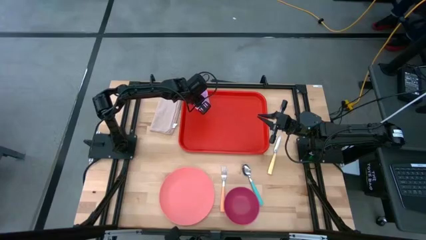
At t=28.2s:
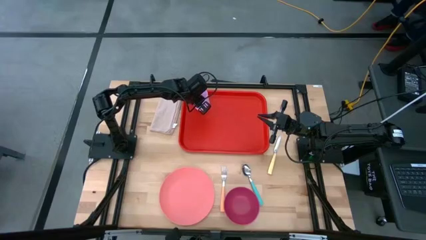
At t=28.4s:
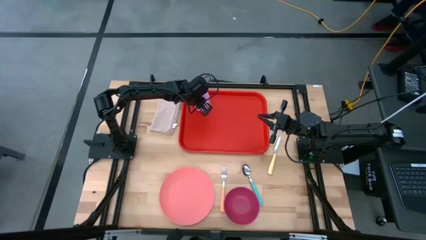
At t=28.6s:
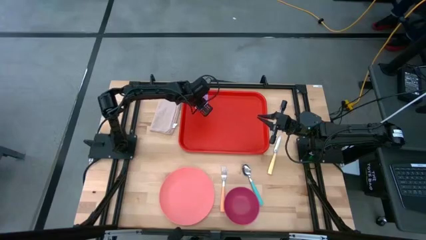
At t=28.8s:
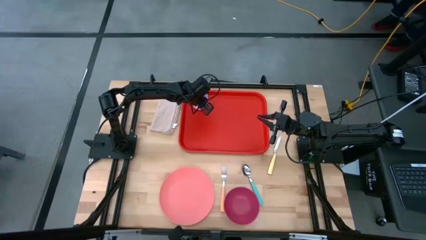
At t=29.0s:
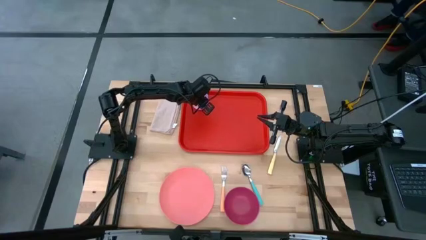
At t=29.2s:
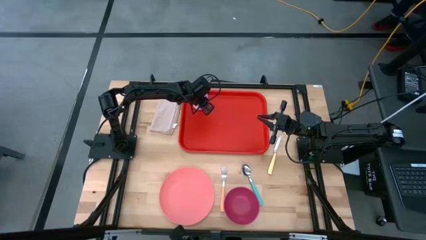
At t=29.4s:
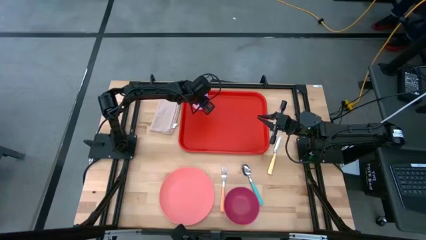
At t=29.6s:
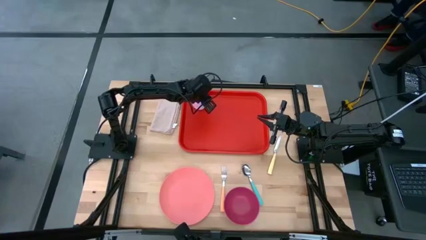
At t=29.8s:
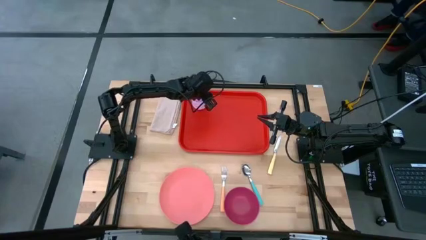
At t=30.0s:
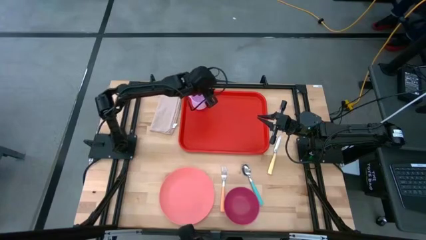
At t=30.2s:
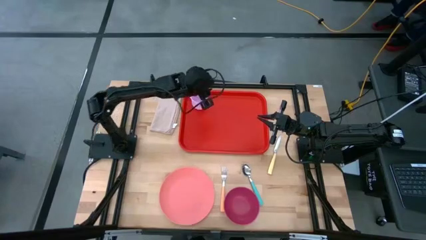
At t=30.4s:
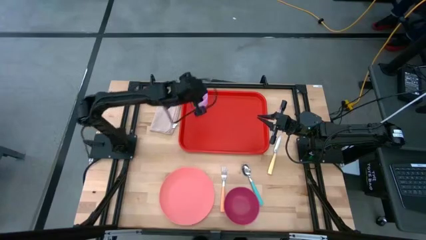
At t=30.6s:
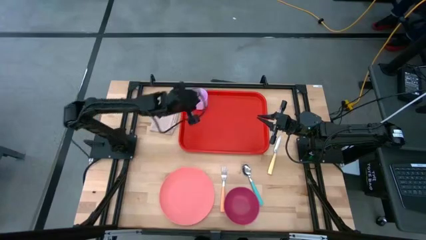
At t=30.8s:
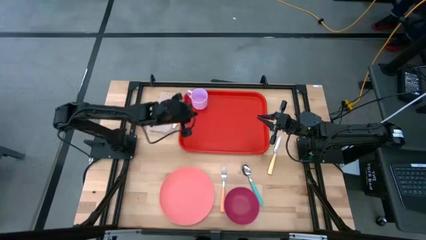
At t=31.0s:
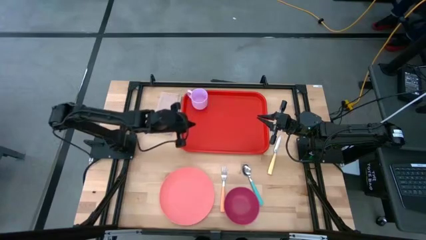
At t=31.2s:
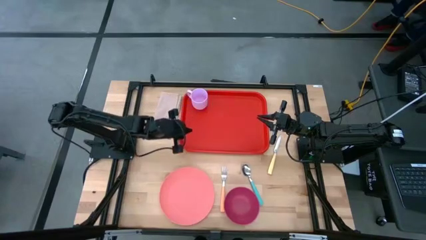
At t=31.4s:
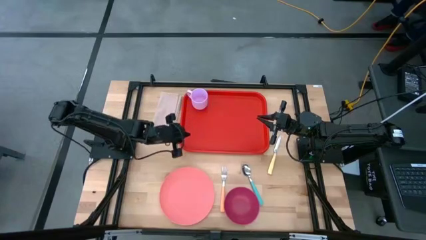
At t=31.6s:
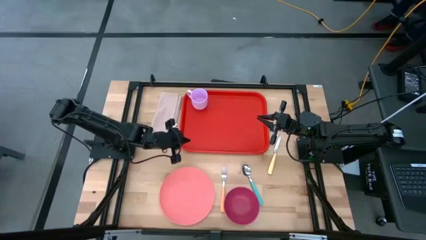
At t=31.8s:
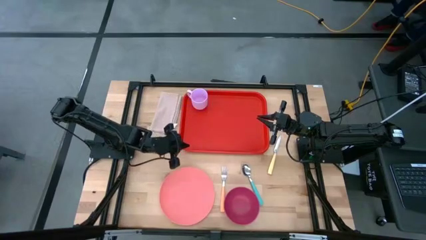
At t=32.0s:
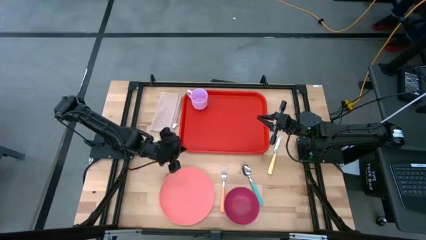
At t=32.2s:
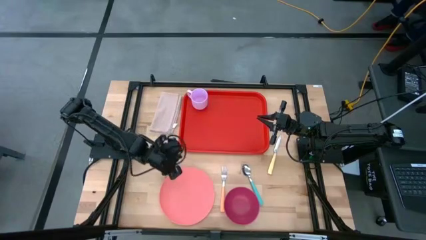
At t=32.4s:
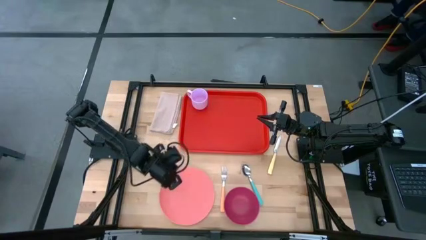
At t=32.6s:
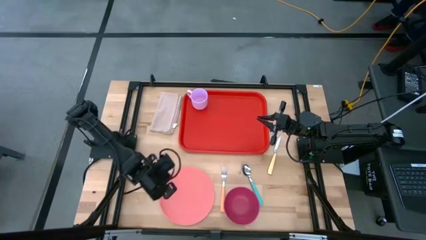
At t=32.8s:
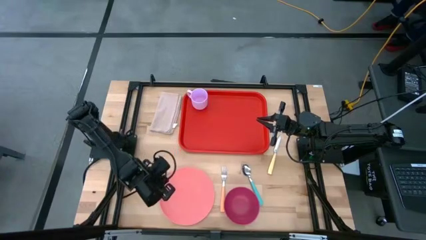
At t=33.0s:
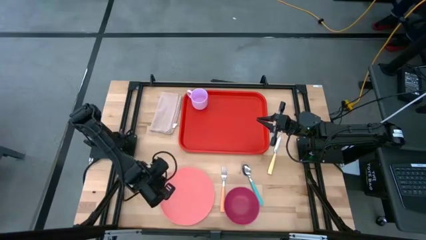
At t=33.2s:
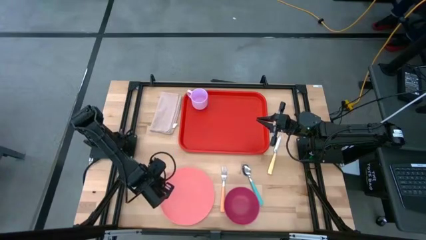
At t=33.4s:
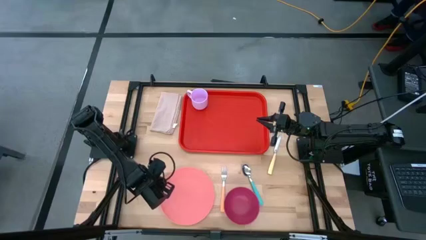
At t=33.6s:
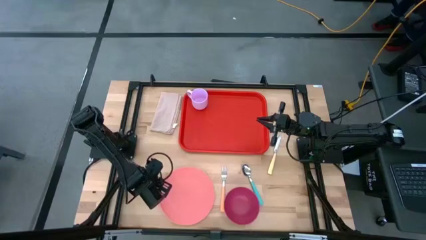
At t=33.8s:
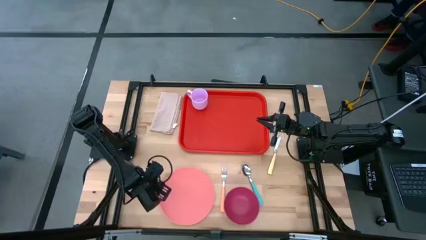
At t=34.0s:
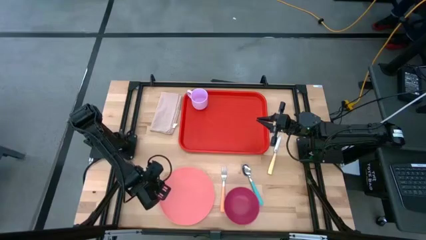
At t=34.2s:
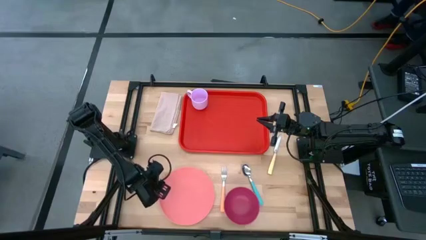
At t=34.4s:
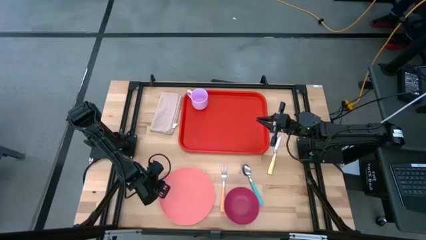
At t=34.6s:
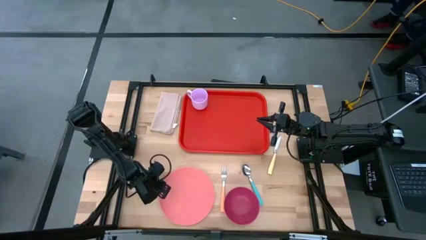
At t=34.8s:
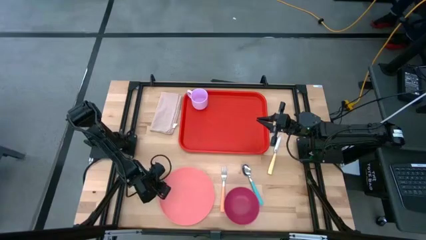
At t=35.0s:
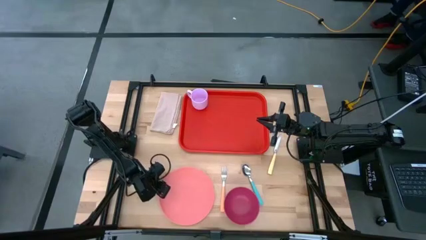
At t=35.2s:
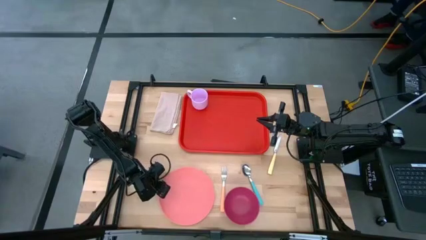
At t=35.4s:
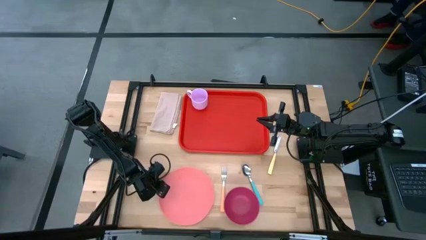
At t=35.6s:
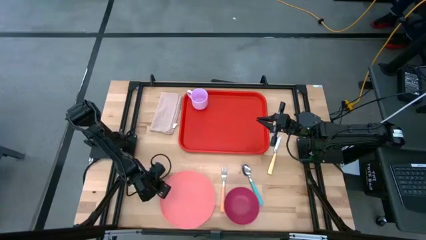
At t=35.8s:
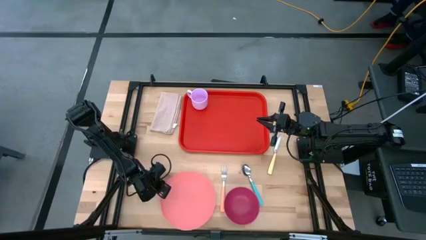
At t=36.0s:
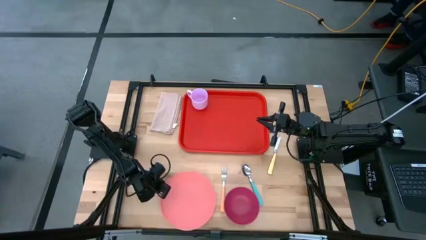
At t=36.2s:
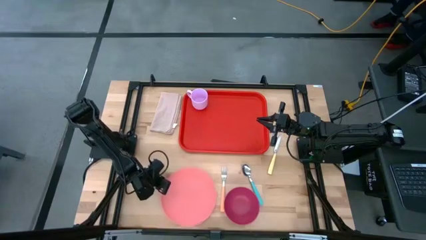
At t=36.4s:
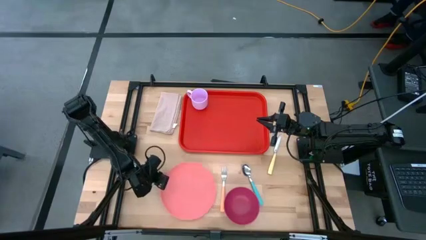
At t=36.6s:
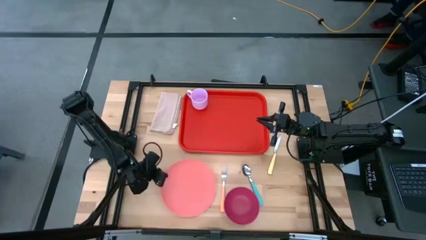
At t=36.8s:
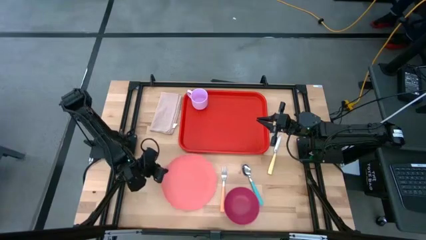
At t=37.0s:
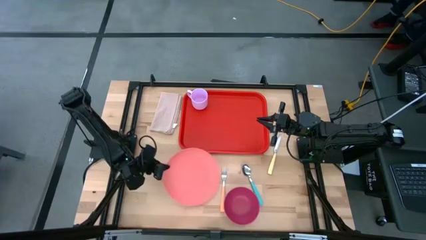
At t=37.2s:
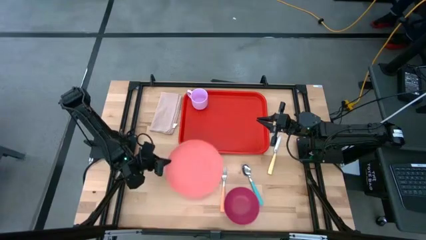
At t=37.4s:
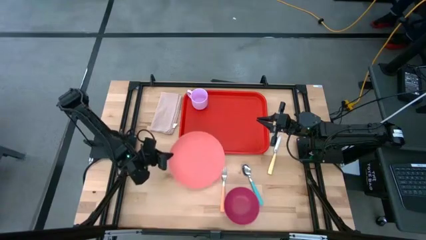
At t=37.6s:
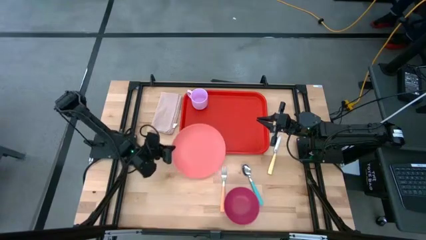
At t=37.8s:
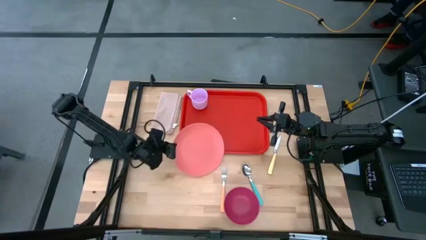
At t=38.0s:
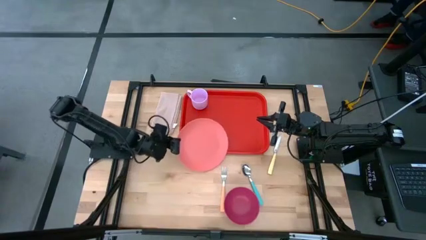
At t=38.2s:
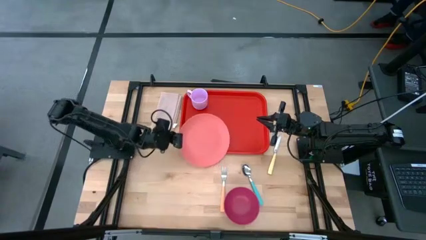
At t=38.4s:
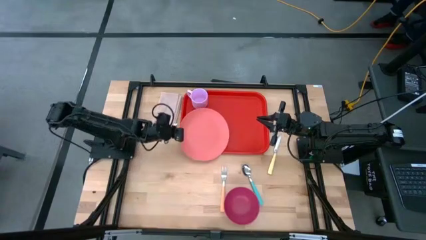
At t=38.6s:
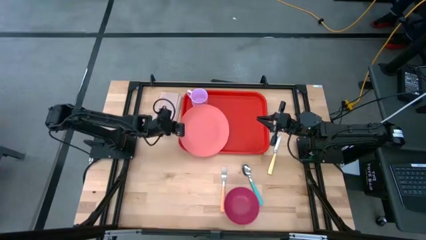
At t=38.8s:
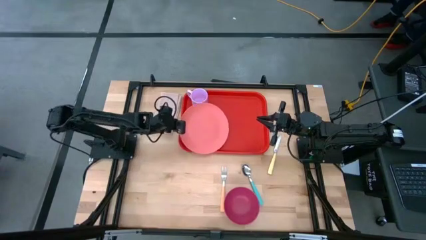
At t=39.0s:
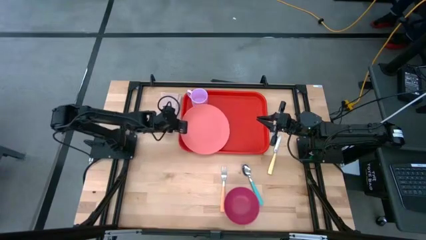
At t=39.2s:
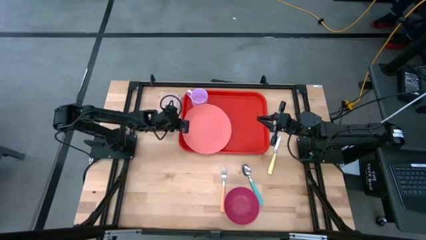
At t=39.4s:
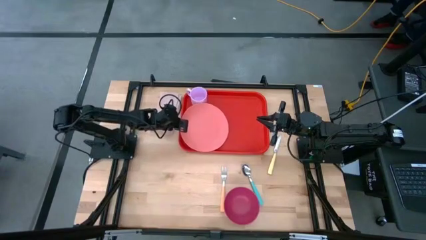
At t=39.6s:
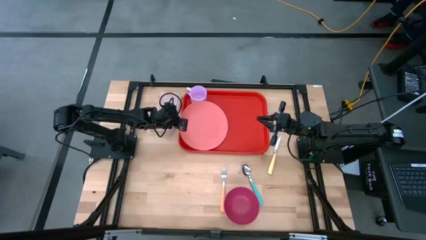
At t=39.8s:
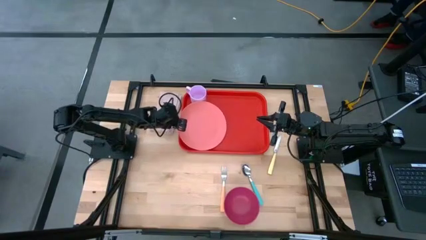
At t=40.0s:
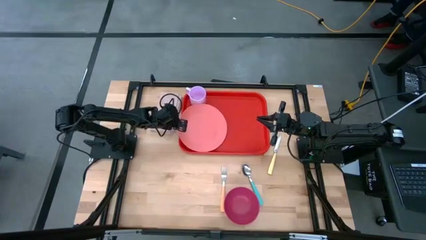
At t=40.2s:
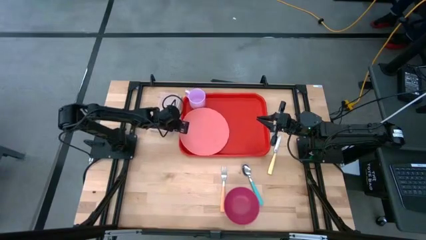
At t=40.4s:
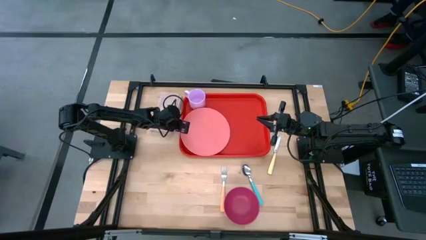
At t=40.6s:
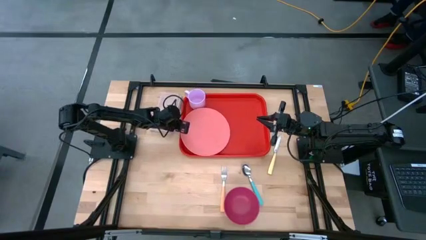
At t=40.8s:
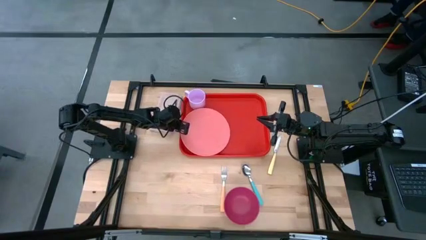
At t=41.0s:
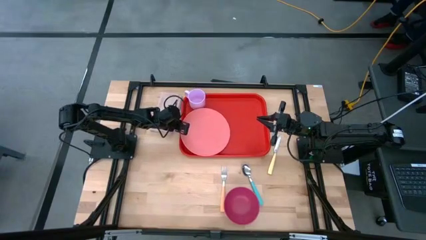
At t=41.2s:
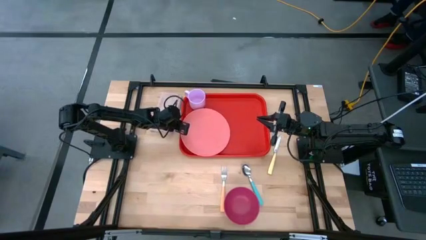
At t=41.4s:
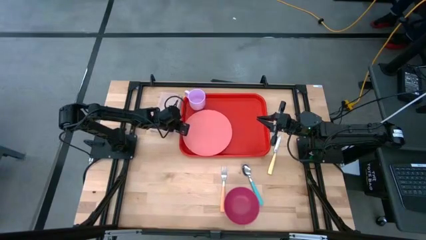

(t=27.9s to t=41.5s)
Task: Set up tray
Put the pink plate on the red tray at the bottom of the purple mug

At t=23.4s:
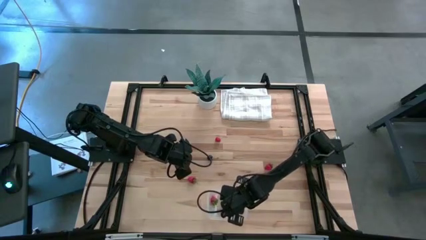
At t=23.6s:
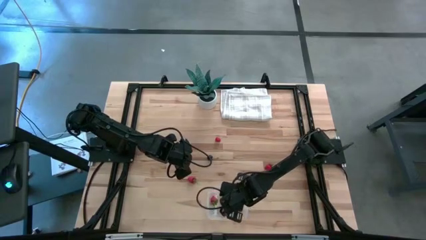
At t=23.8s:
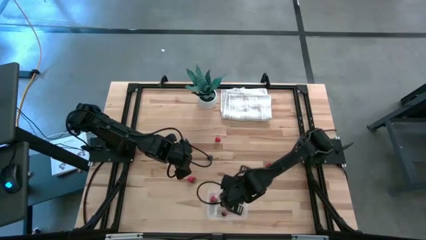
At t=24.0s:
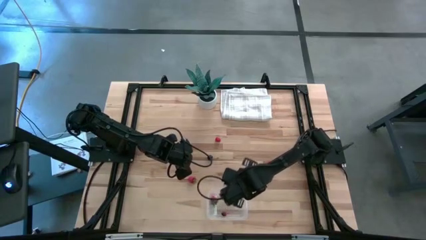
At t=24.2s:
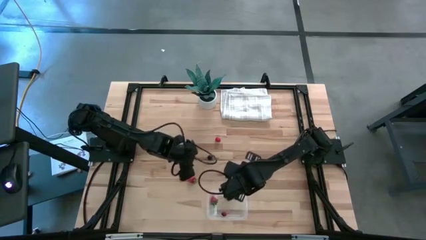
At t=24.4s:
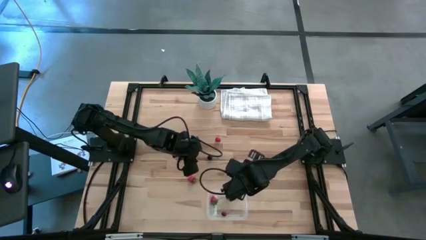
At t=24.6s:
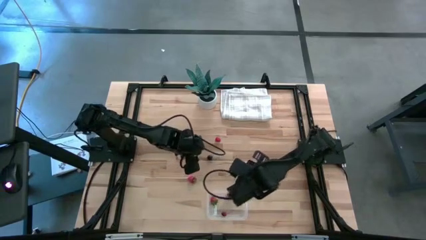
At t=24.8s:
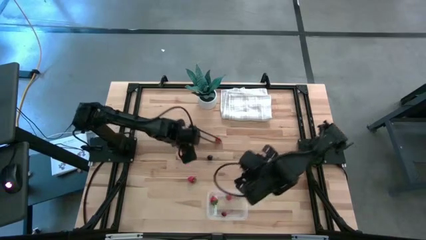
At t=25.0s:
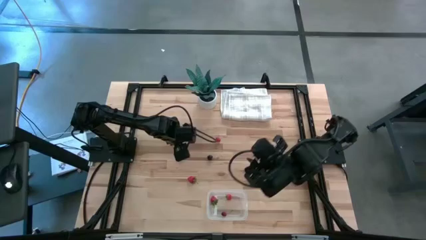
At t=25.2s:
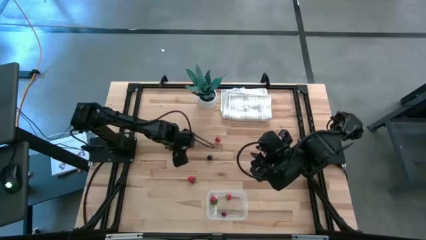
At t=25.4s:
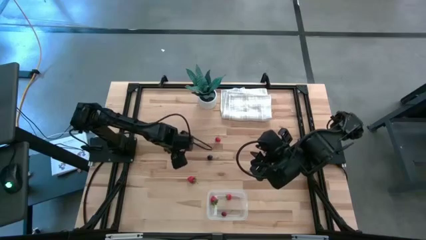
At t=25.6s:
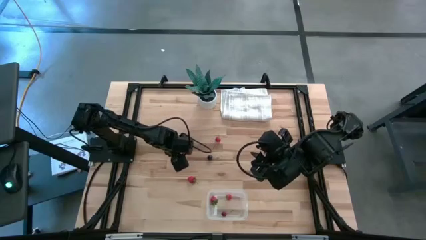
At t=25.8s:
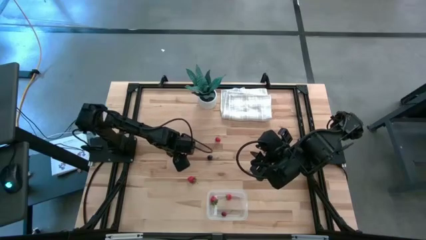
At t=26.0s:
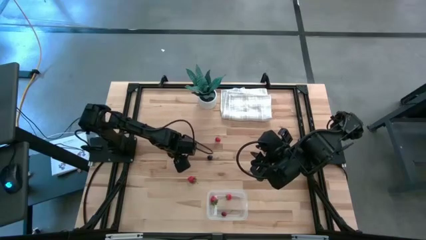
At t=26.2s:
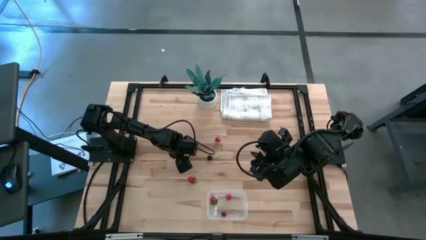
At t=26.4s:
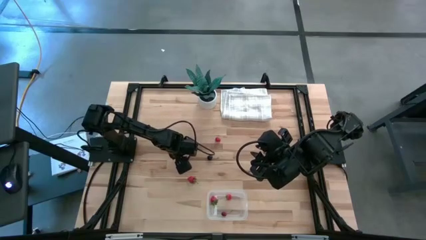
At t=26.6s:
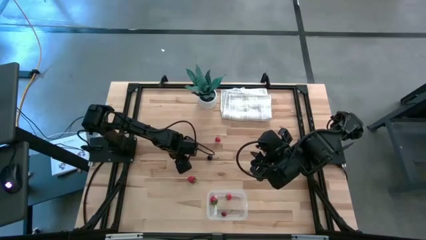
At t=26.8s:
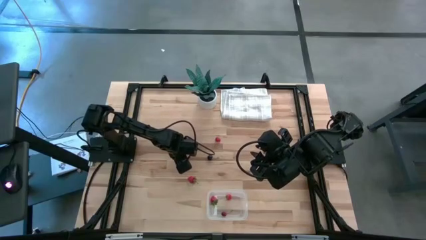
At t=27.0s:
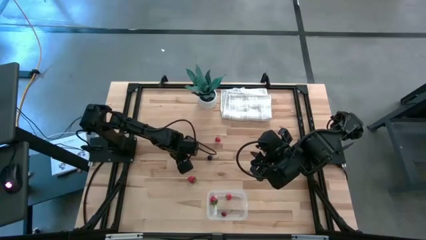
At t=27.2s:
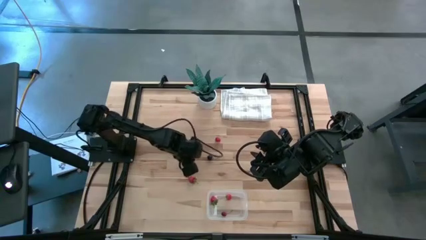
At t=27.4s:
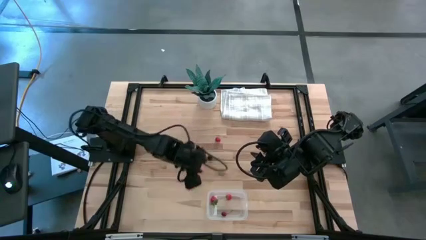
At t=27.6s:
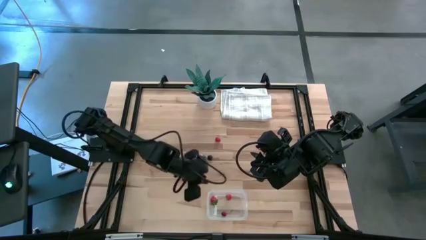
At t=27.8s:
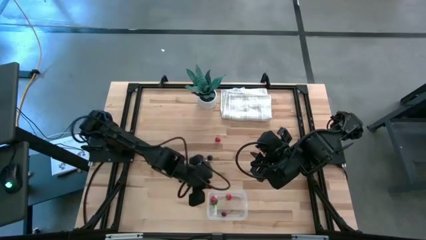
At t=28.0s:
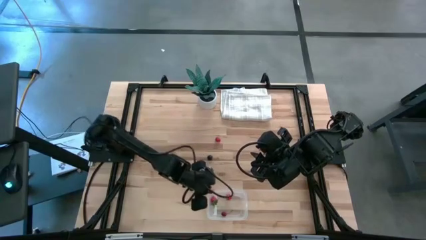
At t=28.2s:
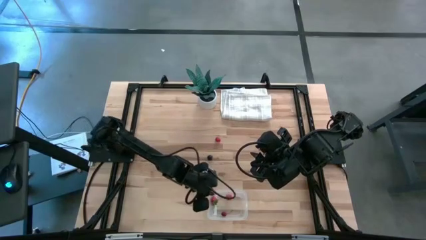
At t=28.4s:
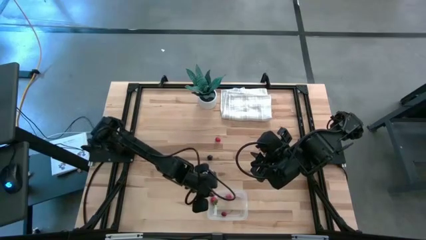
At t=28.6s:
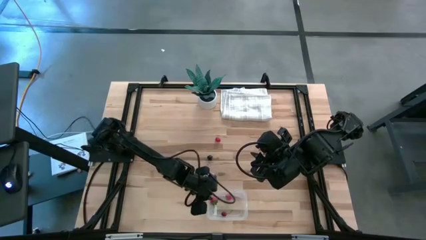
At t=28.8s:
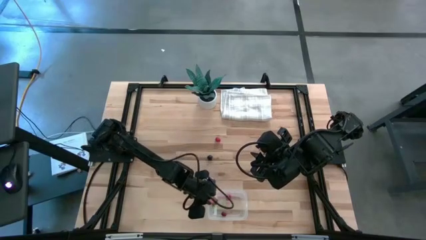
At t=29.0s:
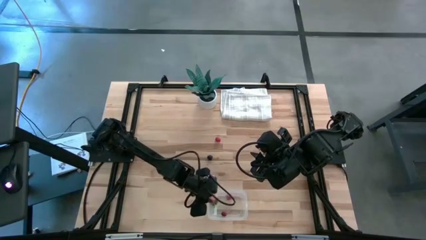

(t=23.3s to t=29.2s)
Task: Pick and placing Produce into tupperware
Put the peach into the transparent bin
